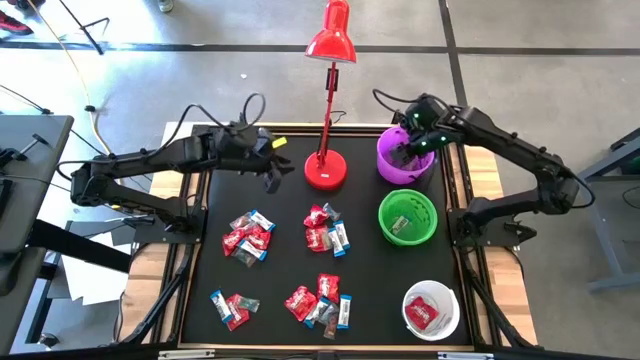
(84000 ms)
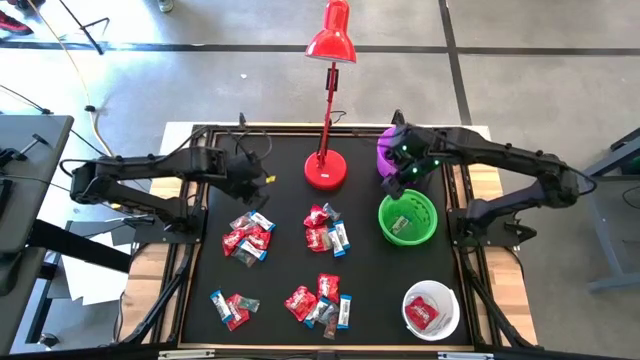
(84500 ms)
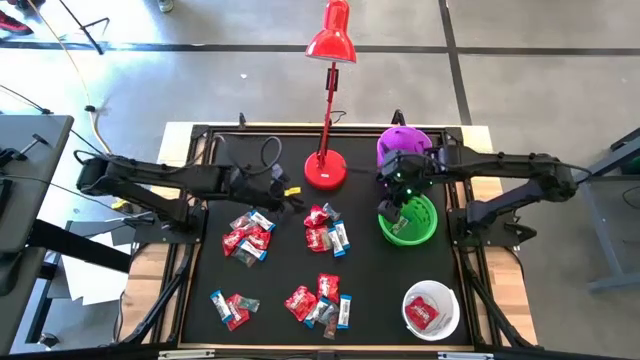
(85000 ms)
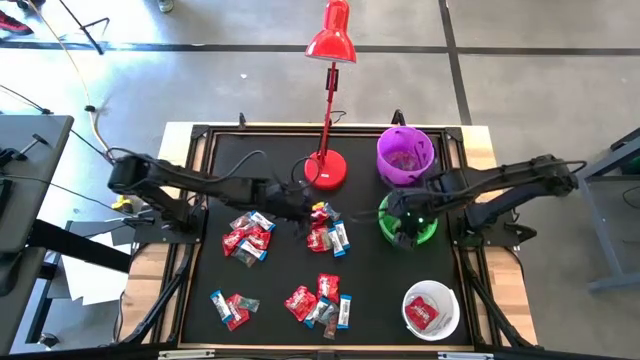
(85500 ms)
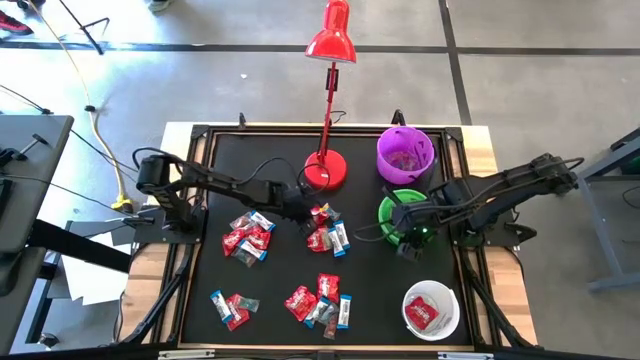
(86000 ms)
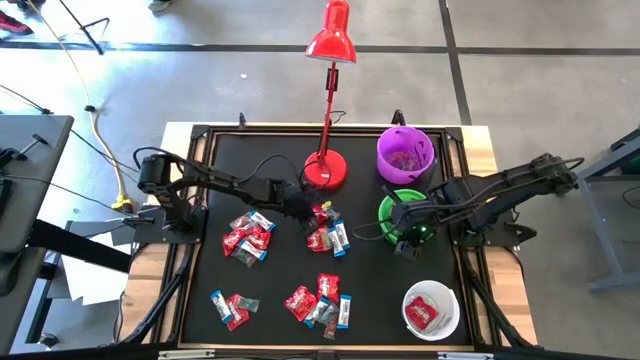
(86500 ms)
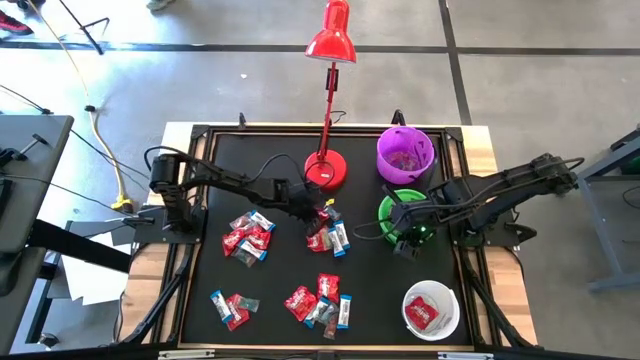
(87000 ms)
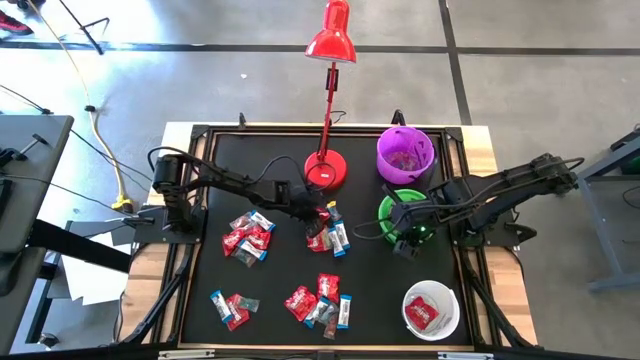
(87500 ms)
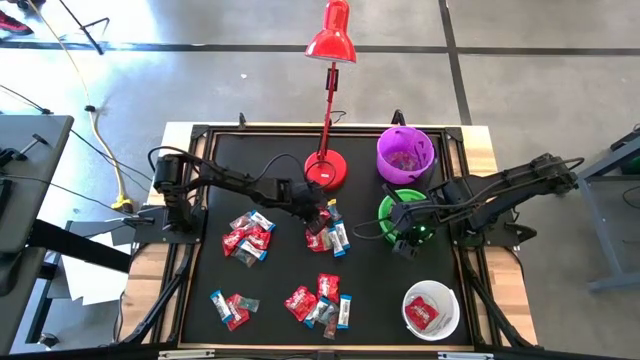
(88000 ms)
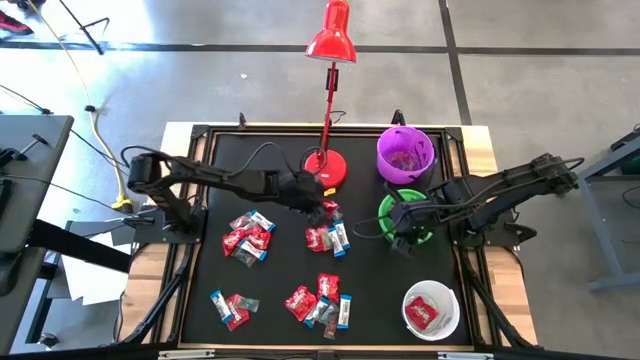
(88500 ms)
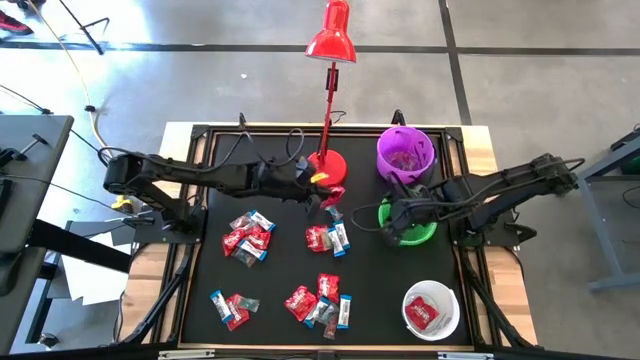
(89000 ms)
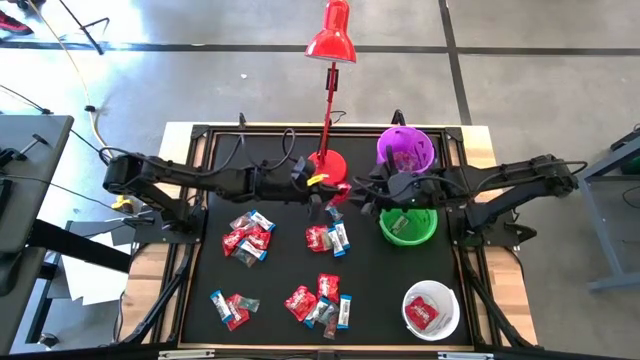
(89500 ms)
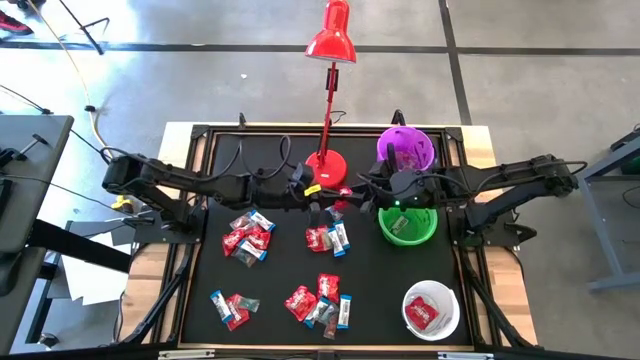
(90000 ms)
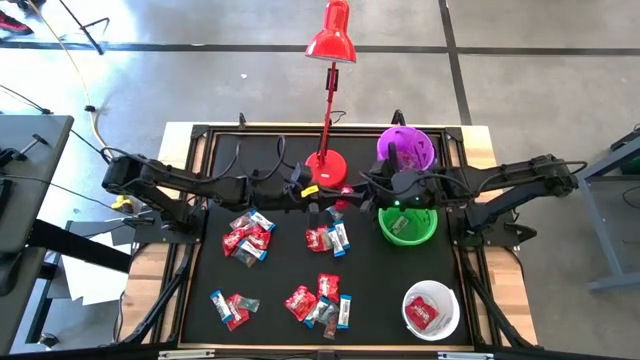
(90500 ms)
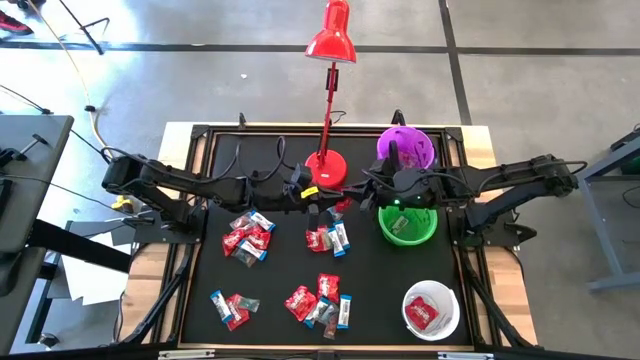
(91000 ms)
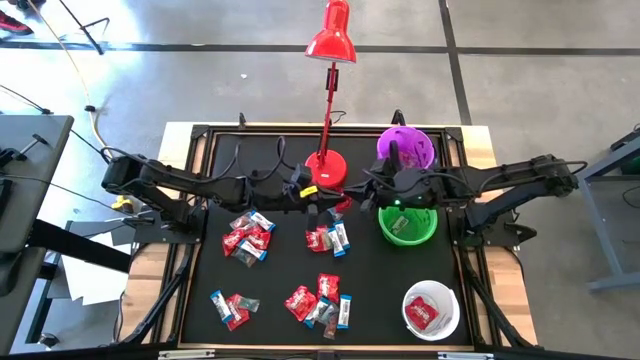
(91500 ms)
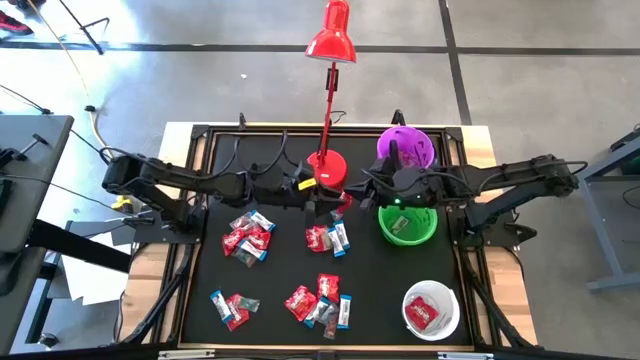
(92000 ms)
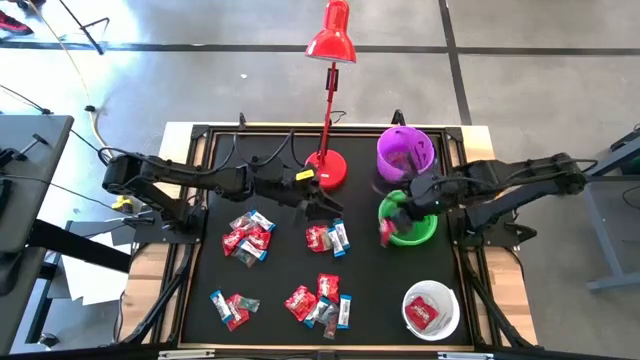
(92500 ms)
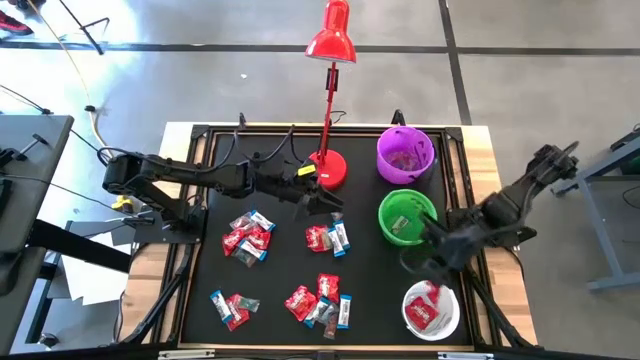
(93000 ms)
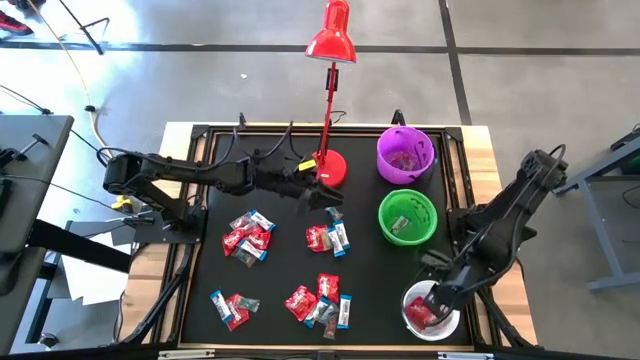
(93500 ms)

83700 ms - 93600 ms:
Task: Organize candy in baskets
Put the red candy into the white bucket

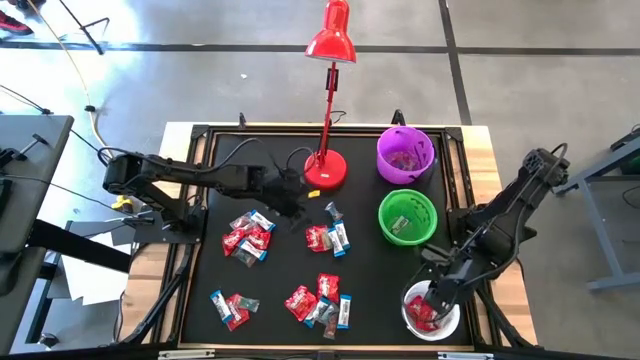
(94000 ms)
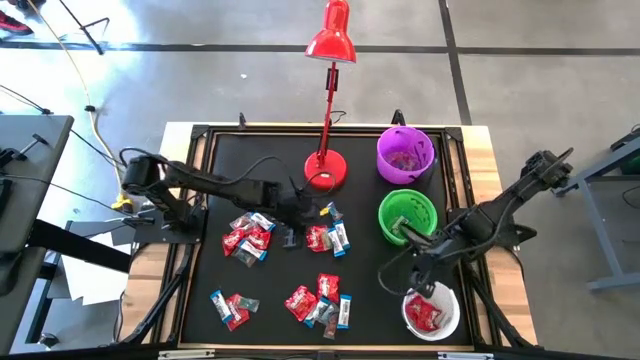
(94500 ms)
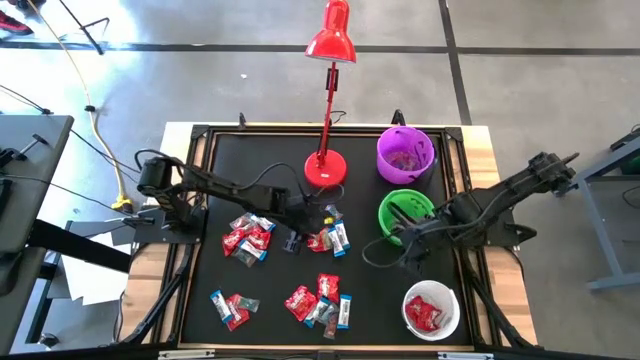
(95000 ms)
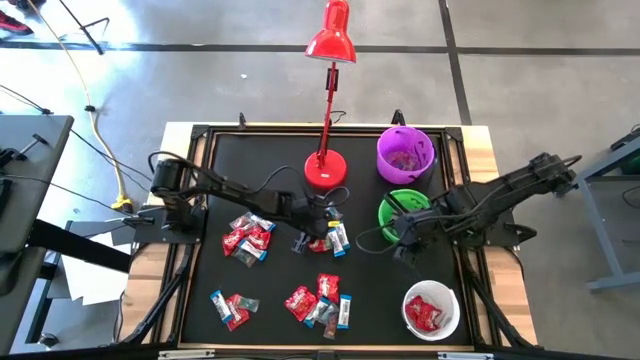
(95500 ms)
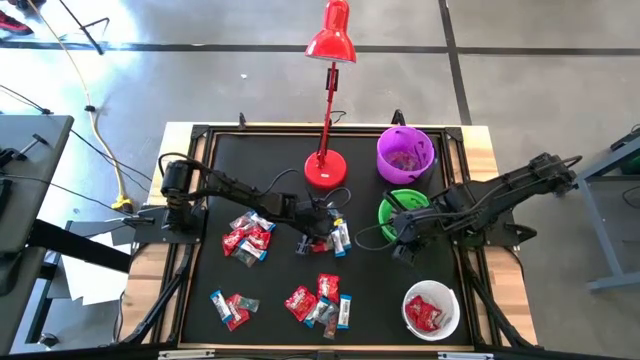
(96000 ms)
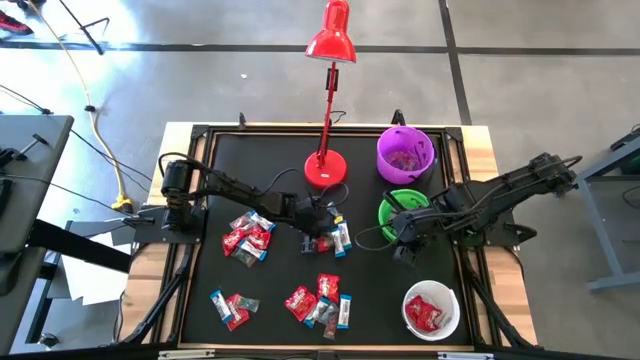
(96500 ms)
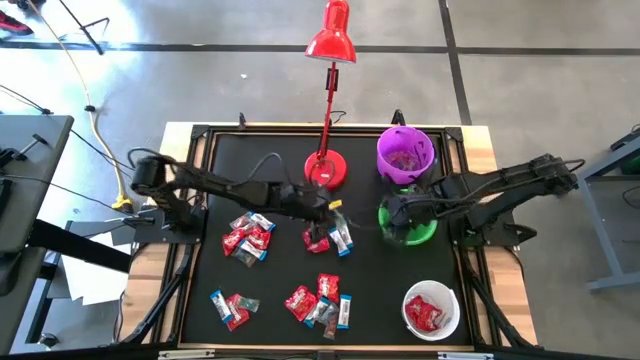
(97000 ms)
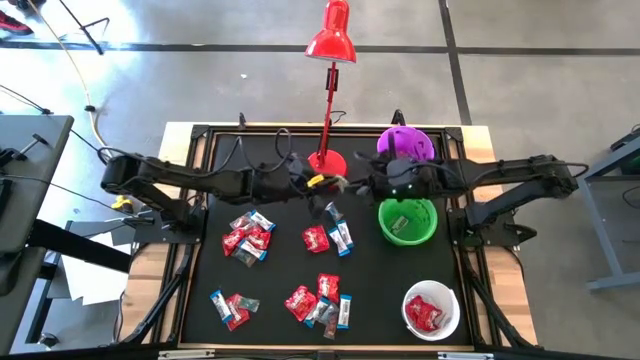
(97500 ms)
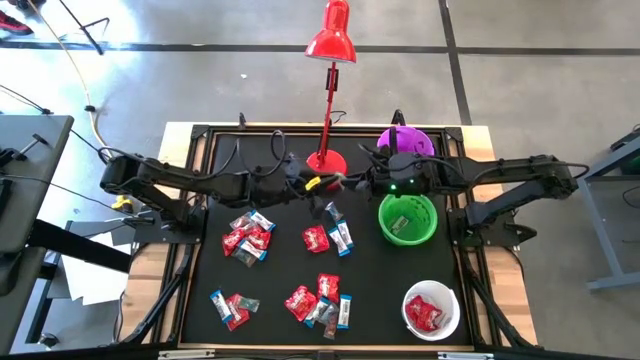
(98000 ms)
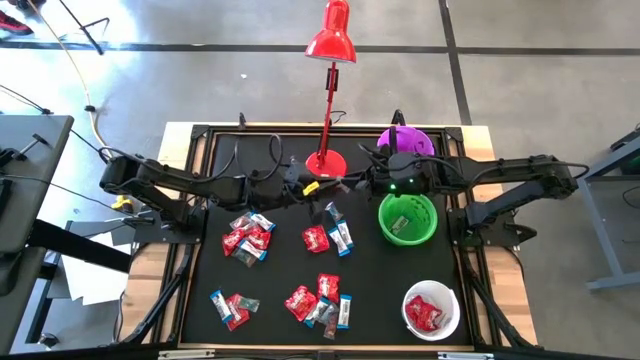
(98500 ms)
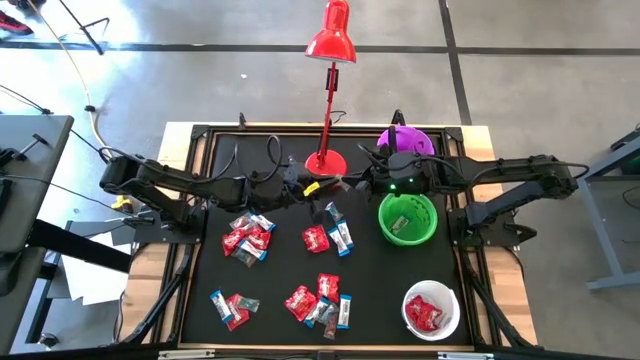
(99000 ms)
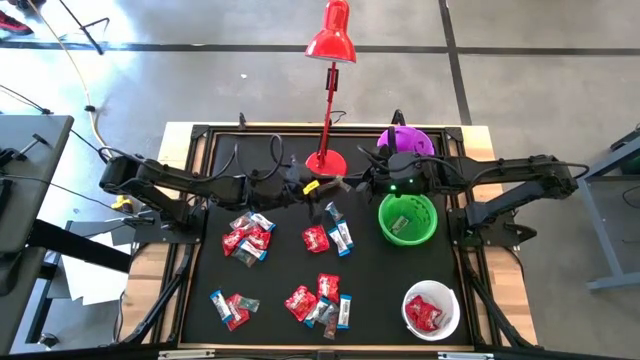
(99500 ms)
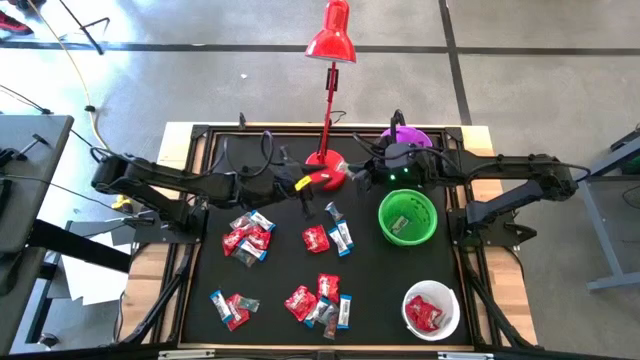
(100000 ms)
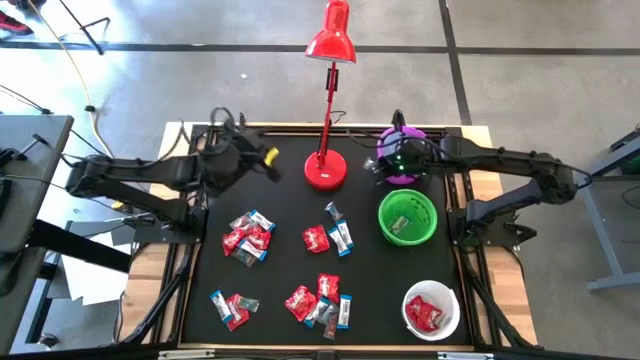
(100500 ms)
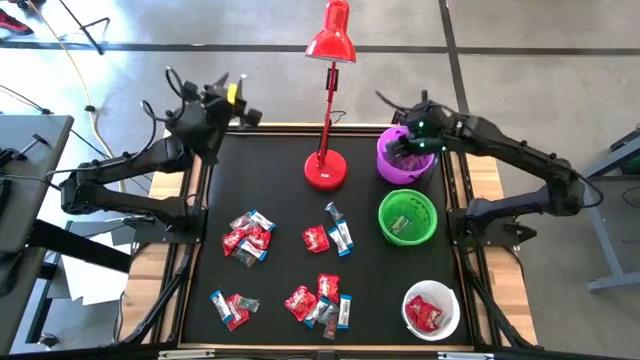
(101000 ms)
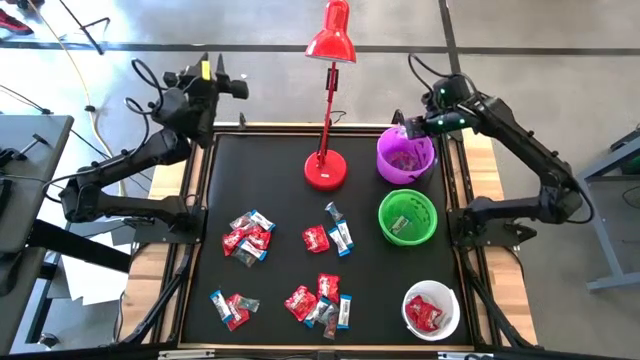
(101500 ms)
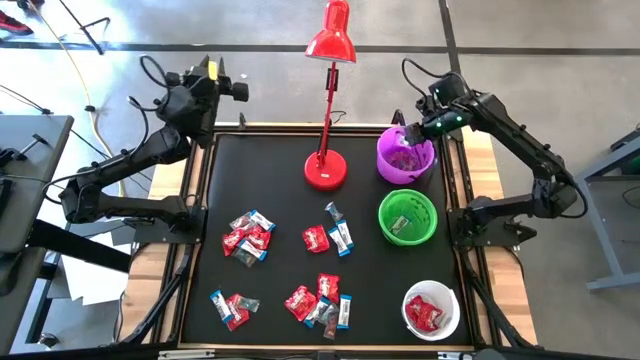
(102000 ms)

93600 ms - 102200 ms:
Put the green gummy into the violet bucket

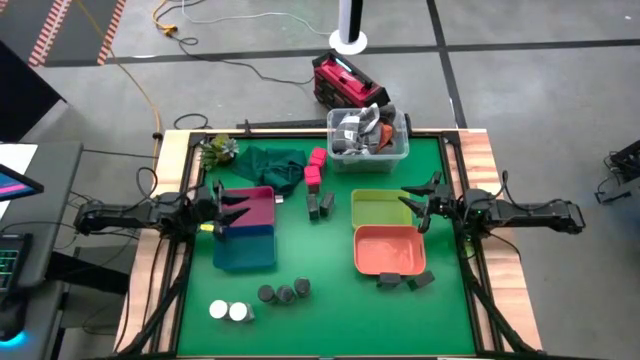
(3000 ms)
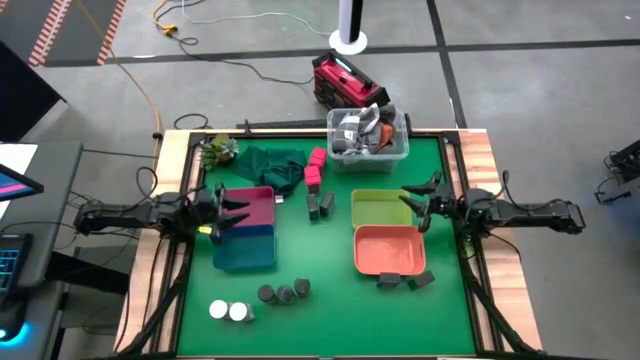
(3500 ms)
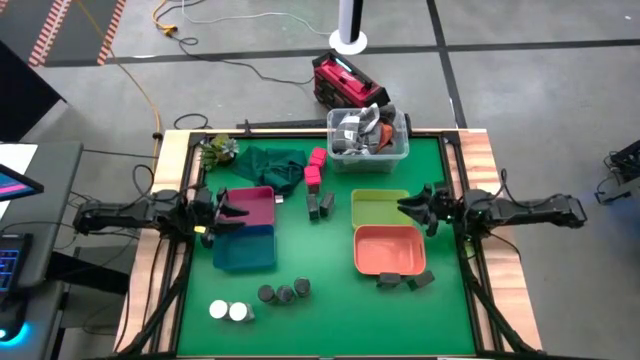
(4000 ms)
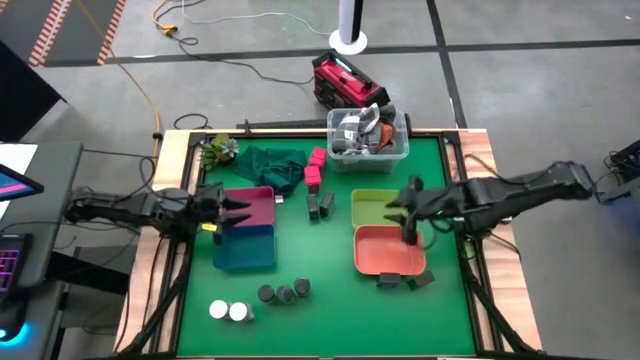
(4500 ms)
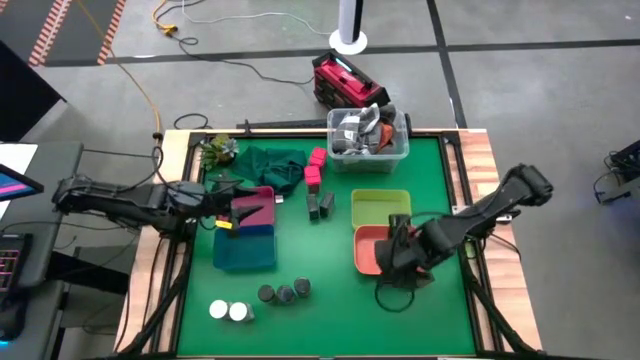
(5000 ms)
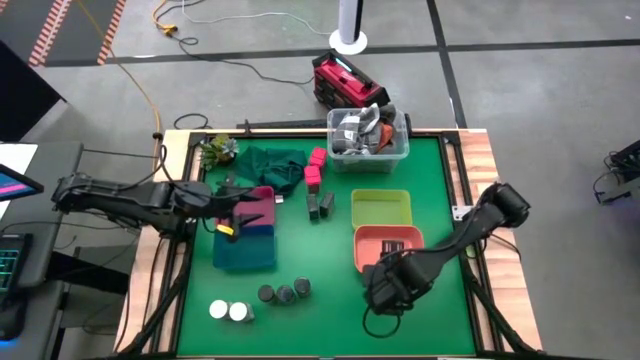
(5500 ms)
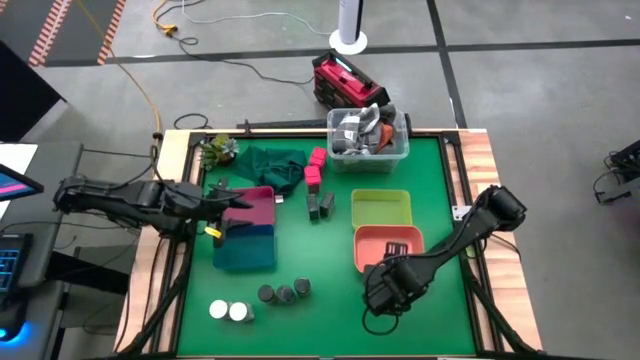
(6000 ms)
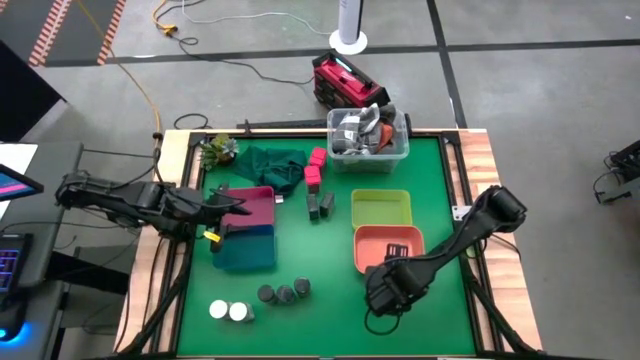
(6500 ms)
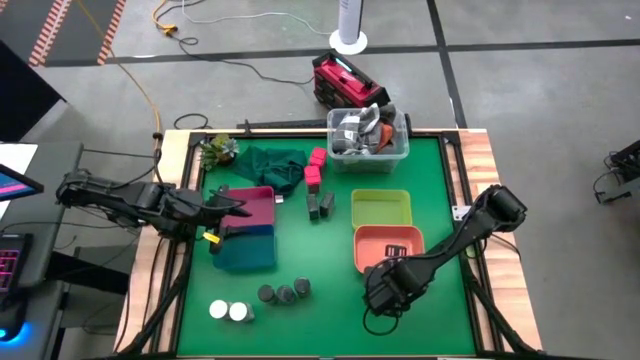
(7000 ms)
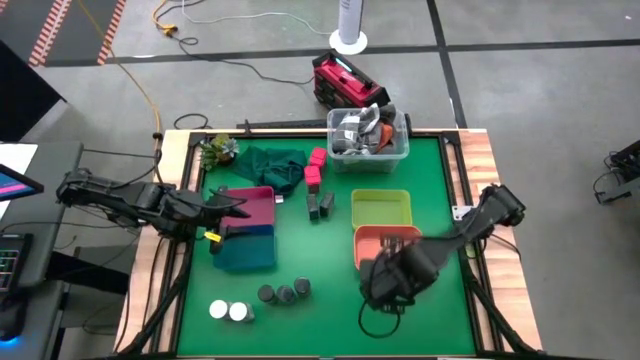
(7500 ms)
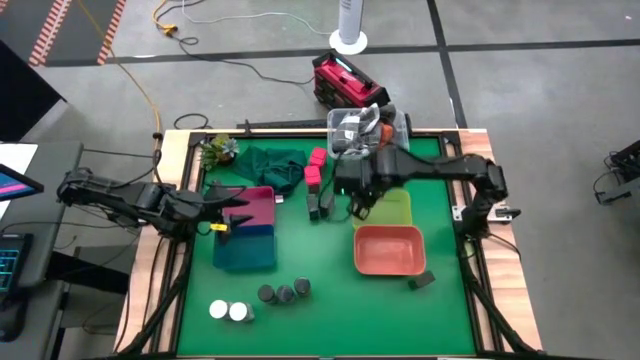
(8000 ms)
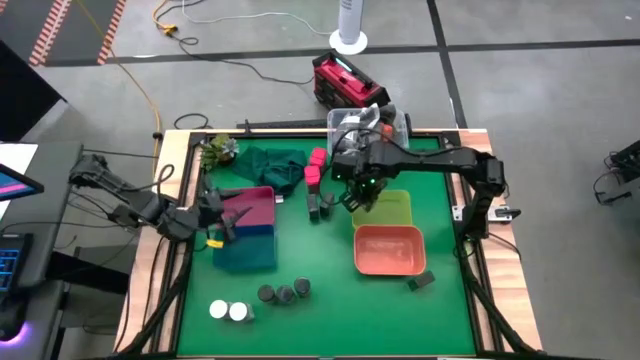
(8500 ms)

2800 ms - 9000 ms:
Task: Sort spices by type
Put the black spice can into the yellow bin
